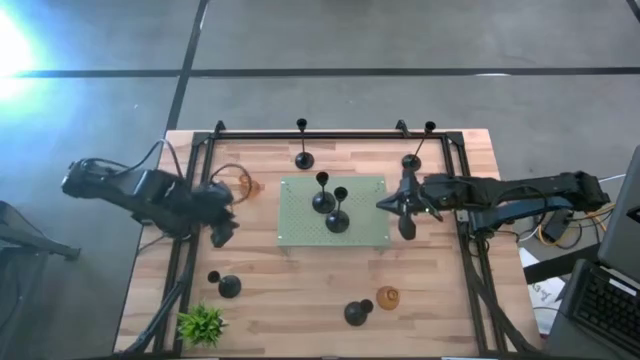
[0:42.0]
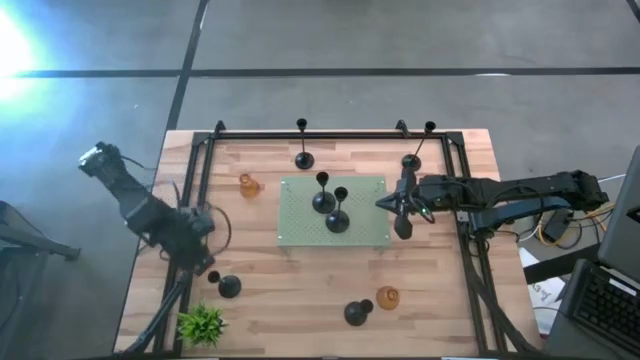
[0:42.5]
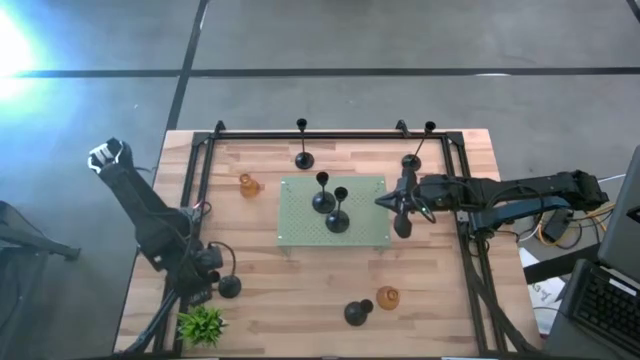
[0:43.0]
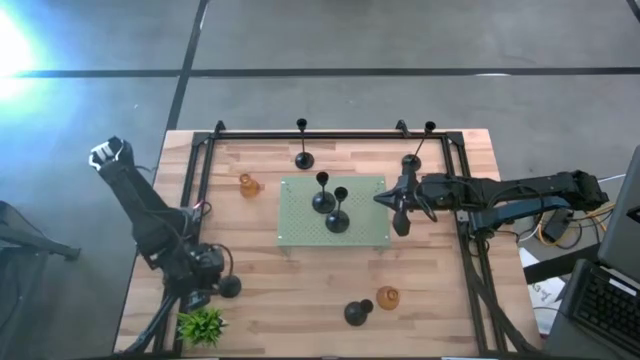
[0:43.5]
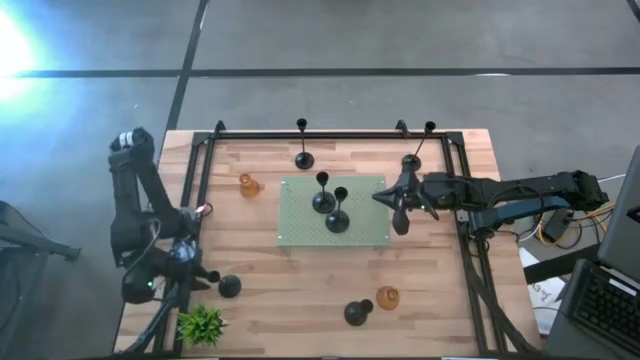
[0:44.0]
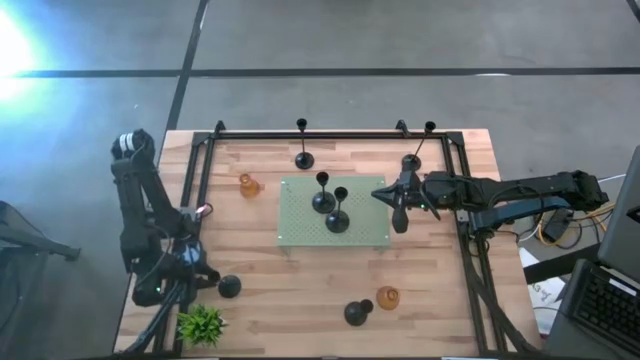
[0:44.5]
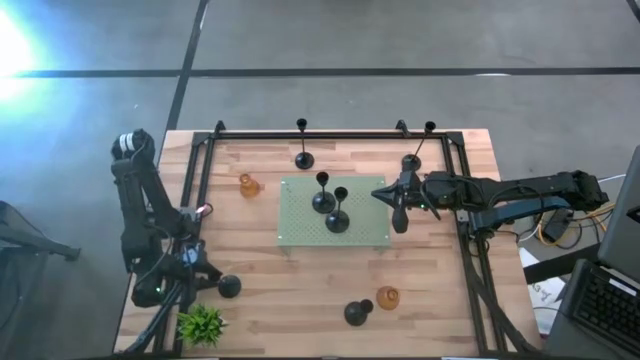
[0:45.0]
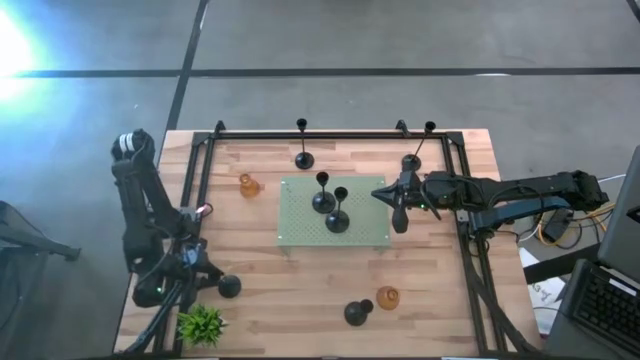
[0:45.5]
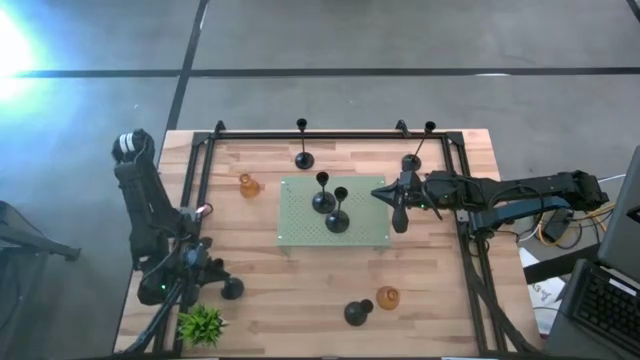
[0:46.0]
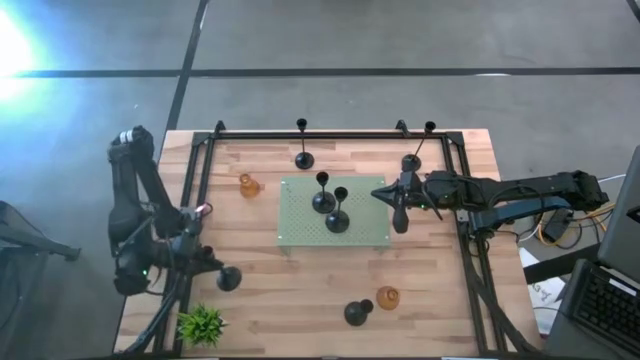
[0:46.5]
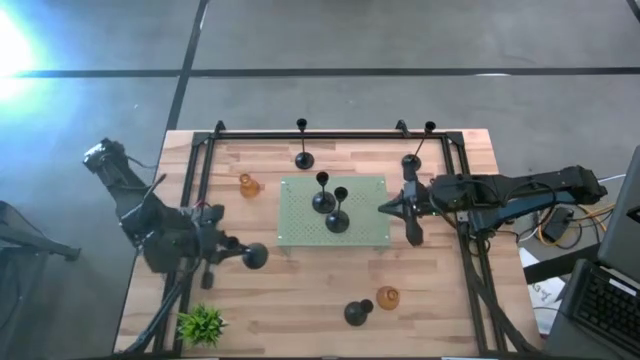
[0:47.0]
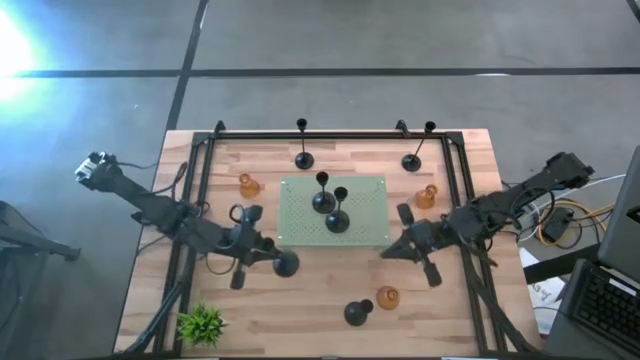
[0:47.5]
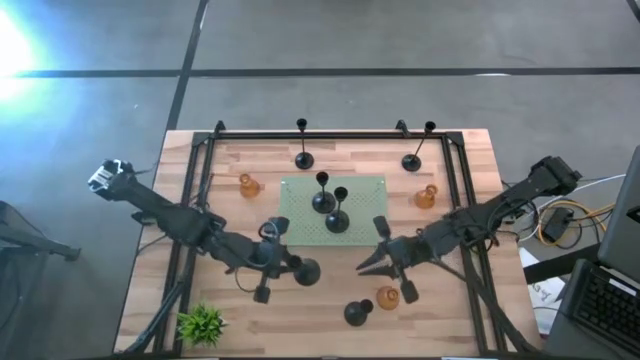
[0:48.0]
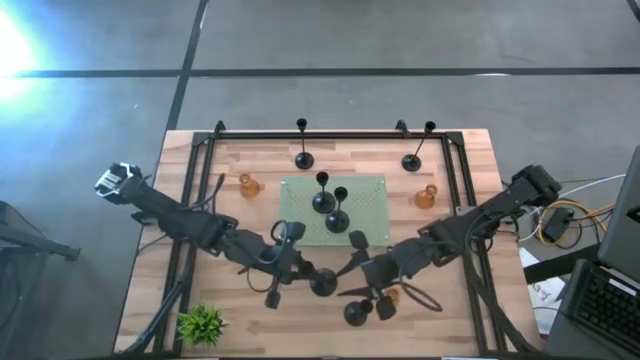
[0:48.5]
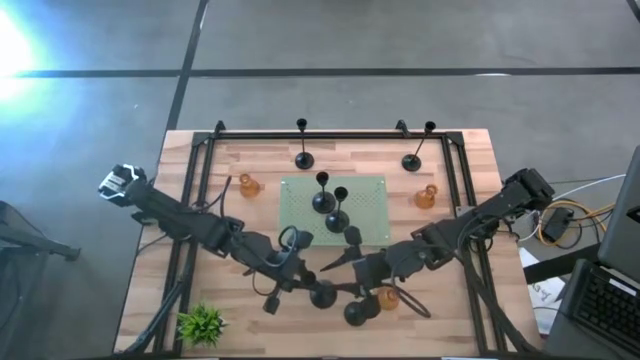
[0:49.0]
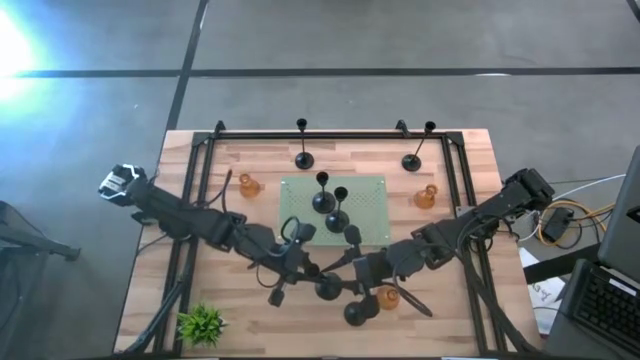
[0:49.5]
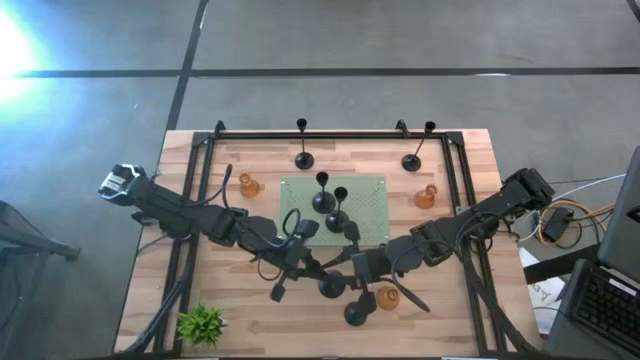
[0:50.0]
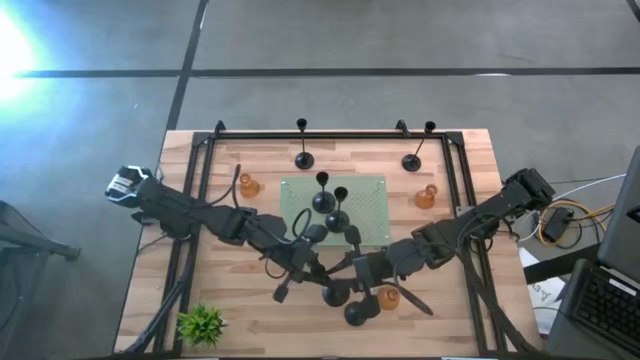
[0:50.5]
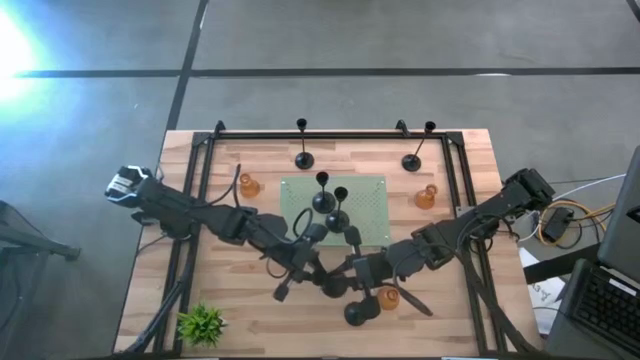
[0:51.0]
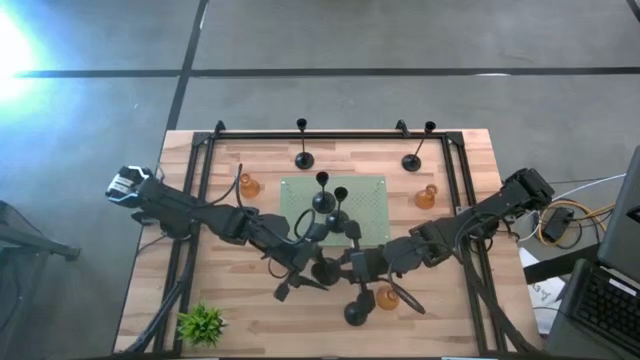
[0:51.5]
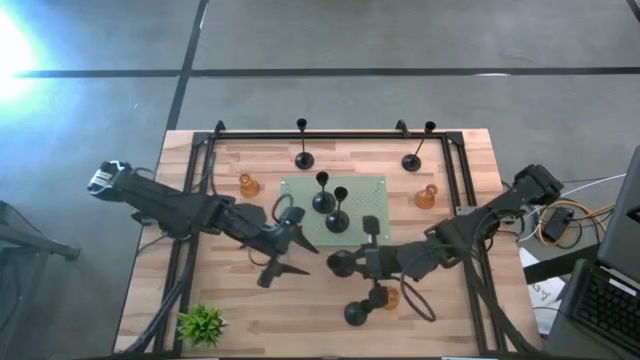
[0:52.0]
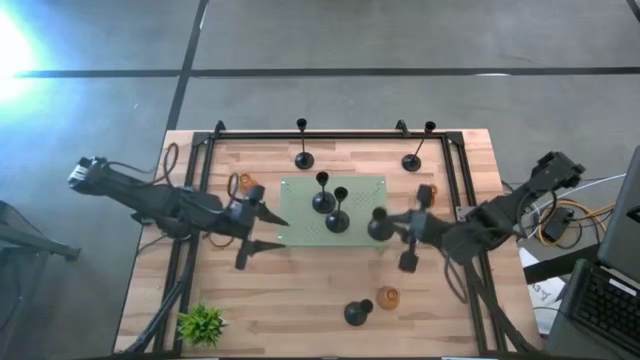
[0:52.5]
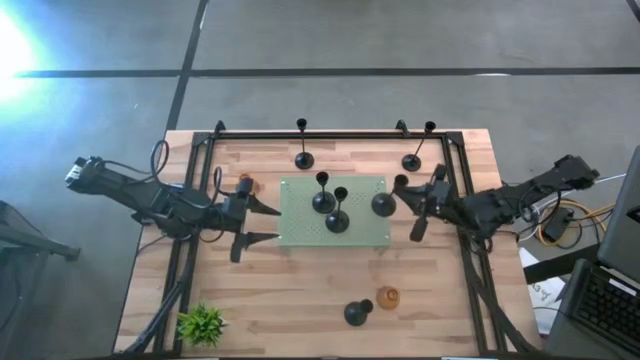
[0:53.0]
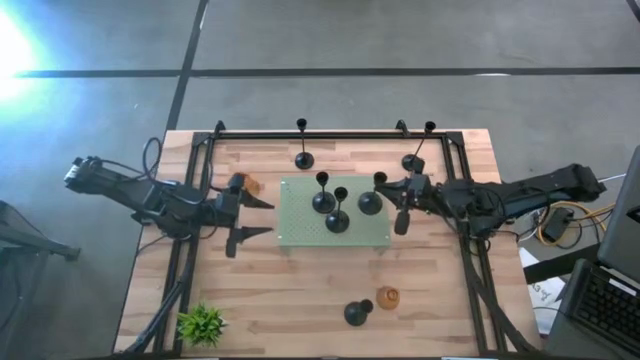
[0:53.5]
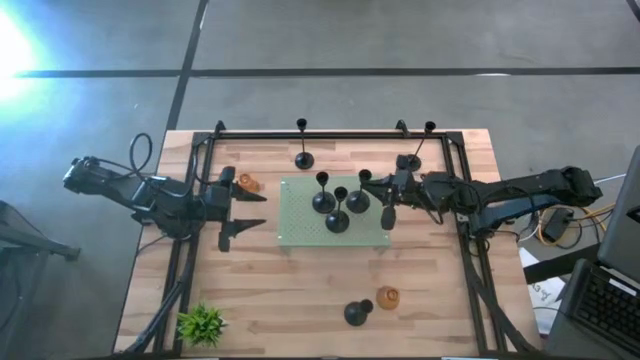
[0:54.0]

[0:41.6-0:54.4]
Task: Pick & Place candle stick holders
Put the black candle holder on the shelf

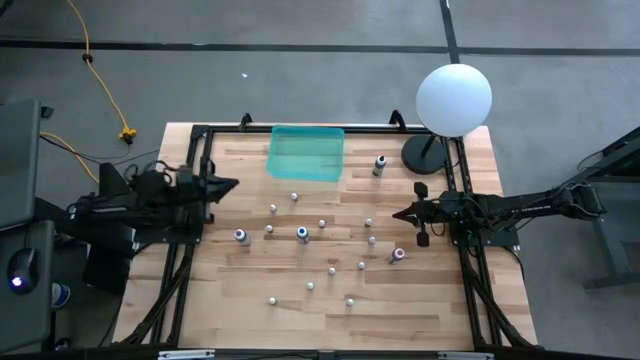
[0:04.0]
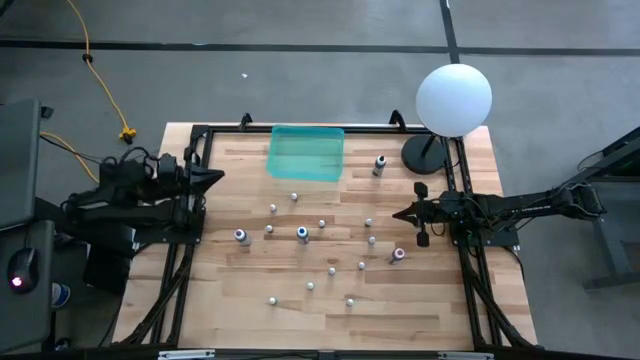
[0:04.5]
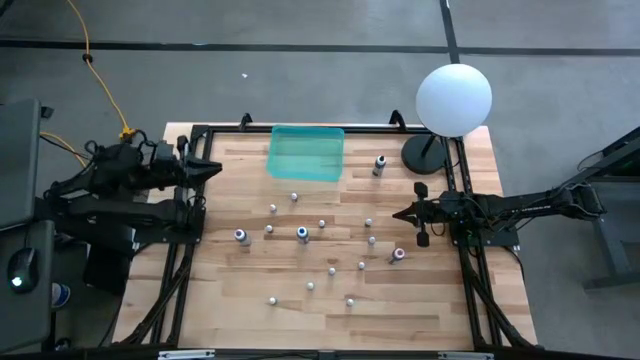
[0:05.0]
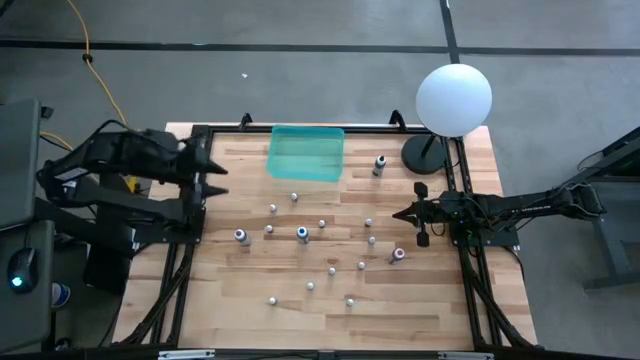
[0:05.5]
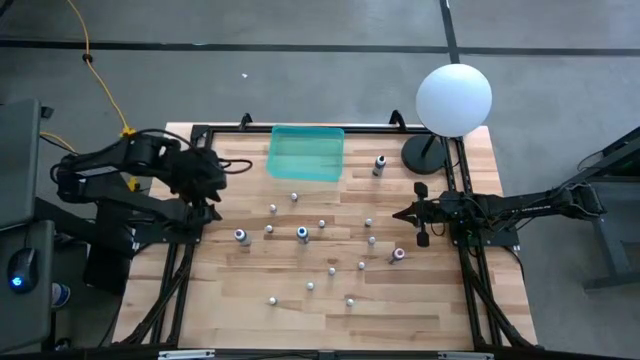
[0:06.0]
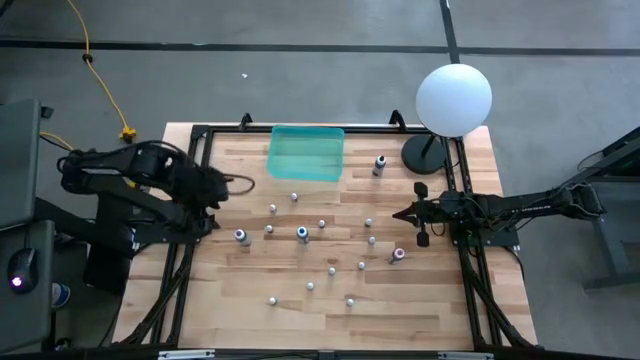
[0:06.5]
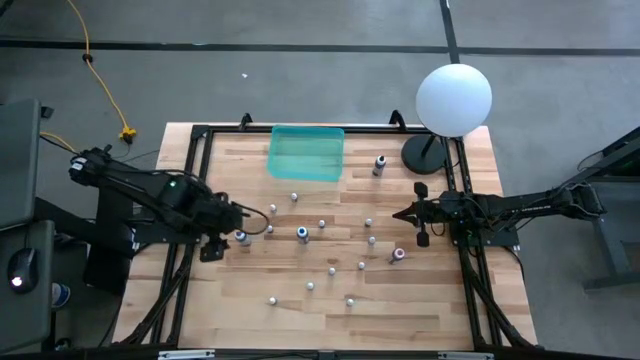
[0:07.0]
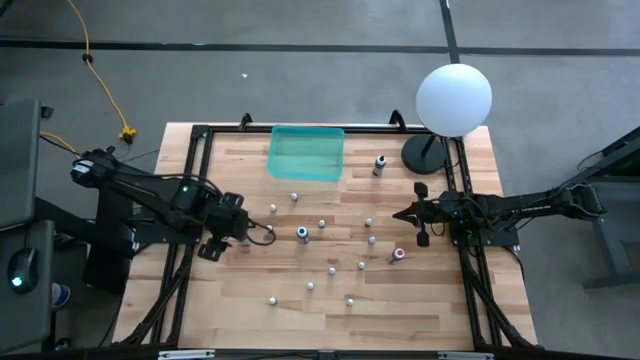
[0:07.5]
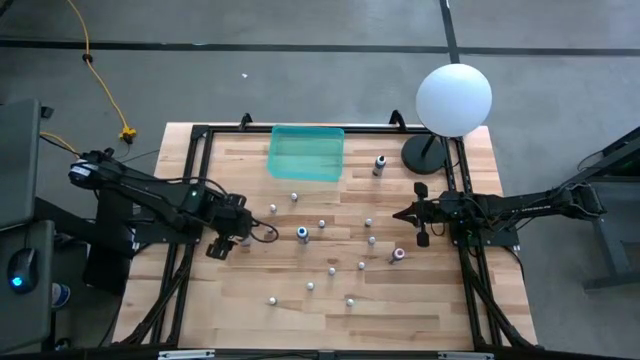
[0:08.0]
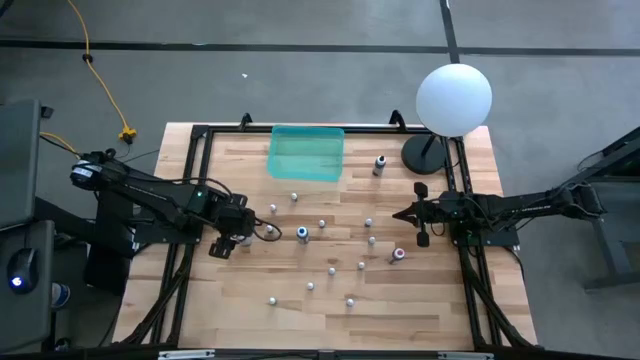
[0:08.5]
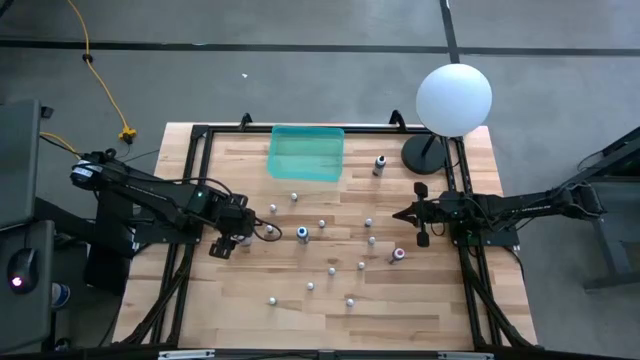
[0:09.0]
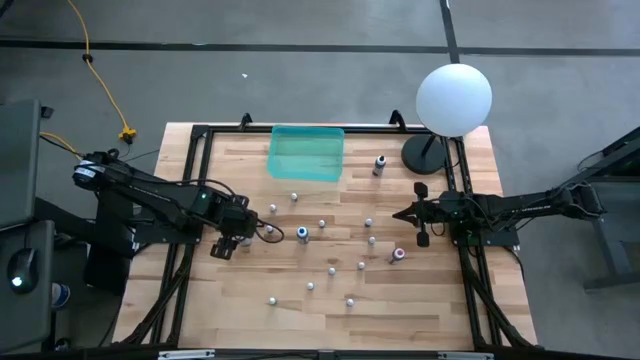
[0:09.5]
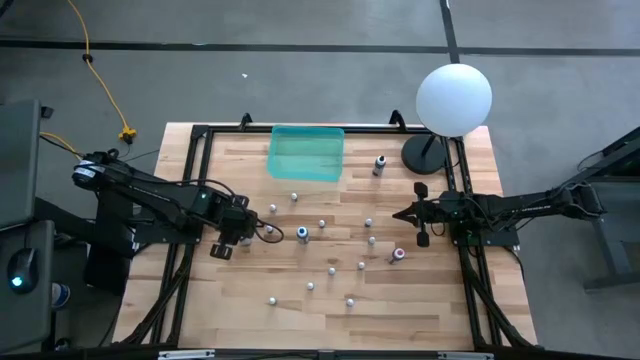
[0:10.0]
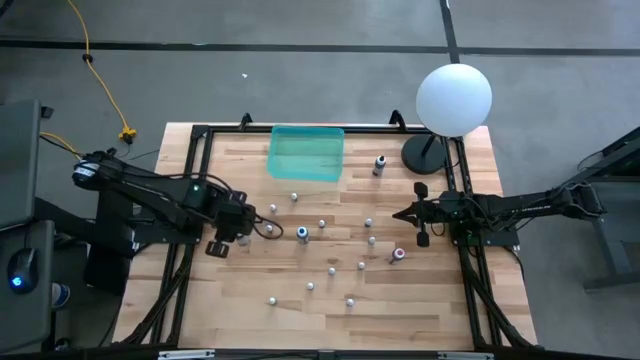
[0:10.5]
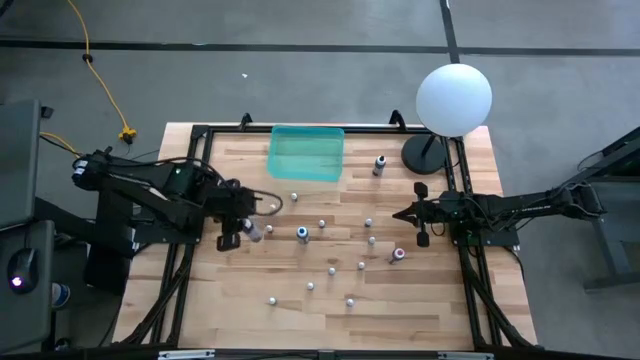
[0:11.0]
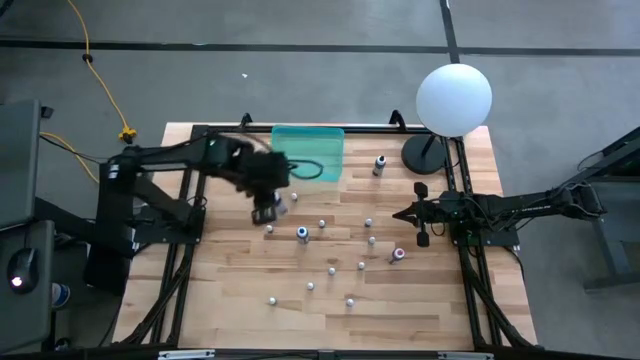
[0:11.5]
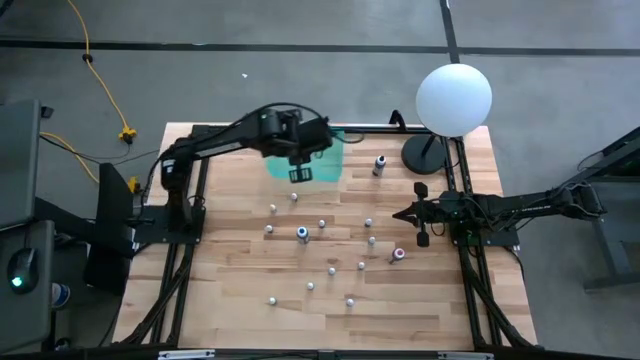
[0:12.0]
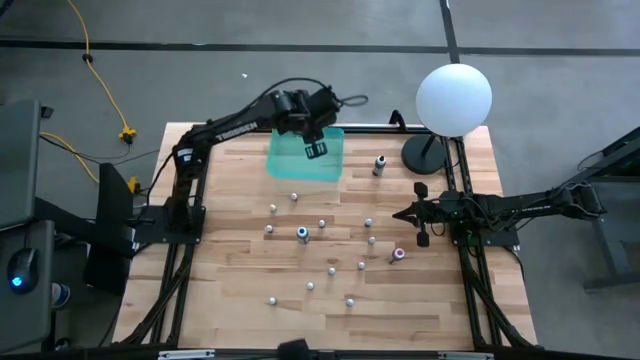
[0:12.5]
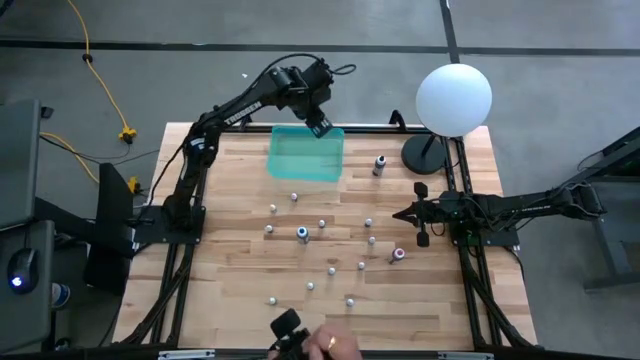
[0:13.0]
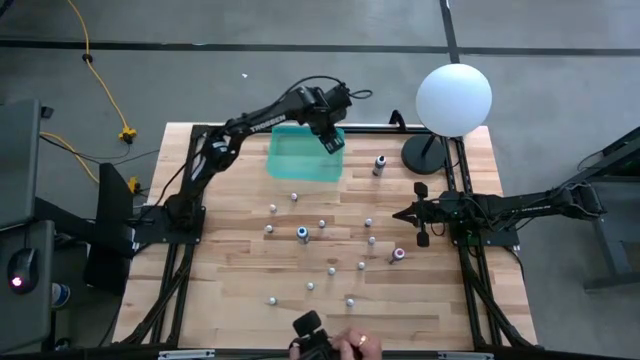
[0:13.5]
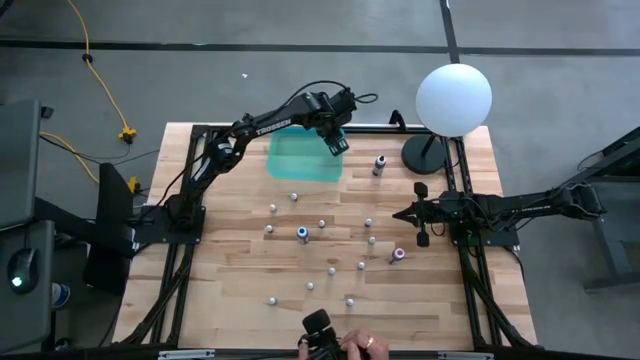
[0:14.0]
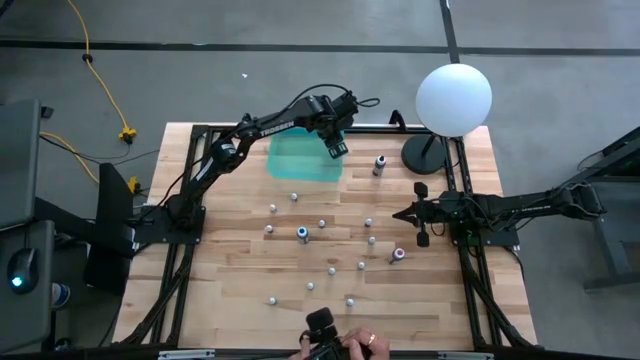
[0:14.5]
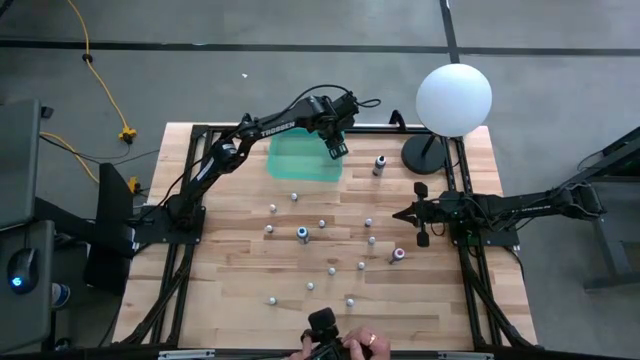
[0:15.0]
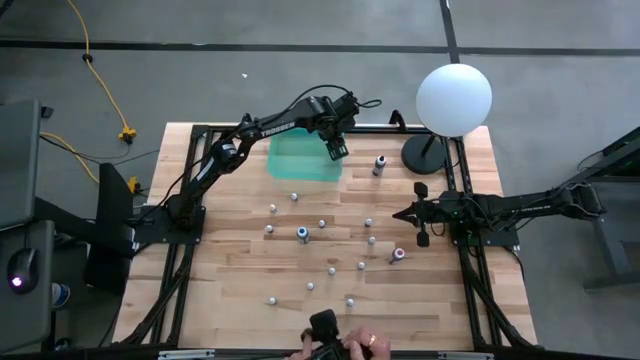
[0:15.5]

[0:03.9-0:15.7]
Task: Pick & Place food coloring
Put the big violet food coloring bottle into the blue transparent bin
